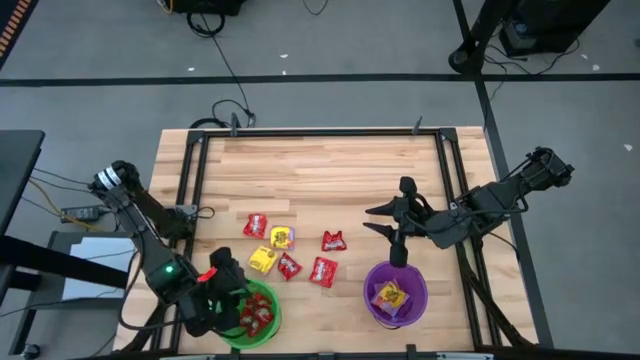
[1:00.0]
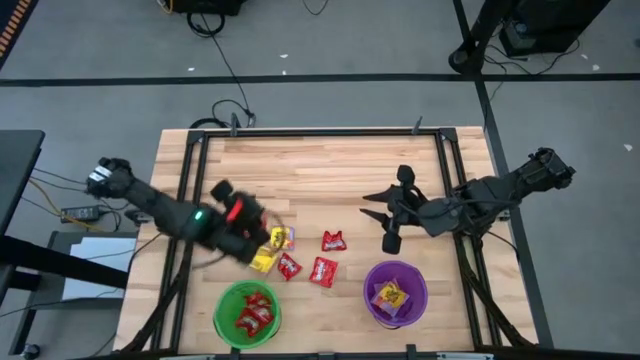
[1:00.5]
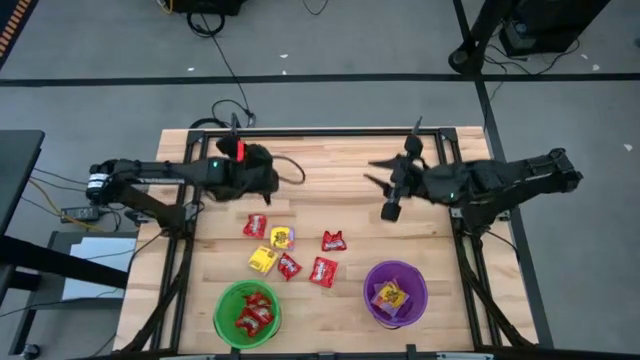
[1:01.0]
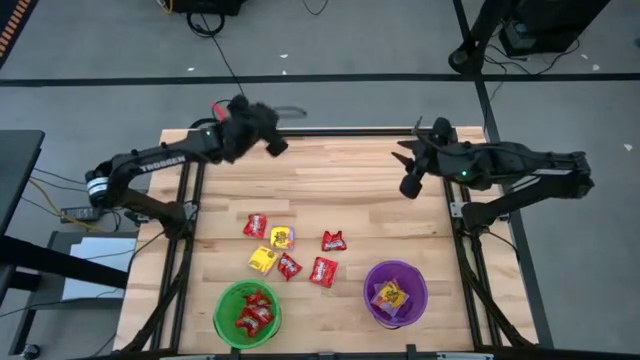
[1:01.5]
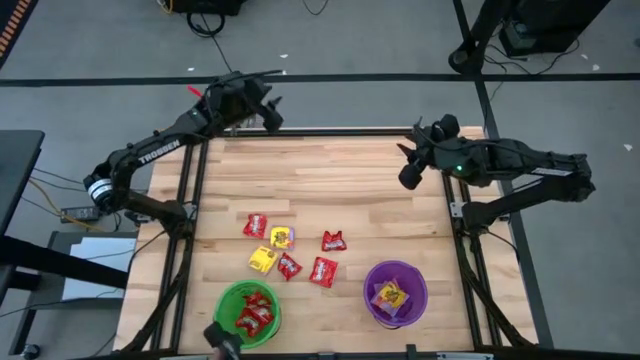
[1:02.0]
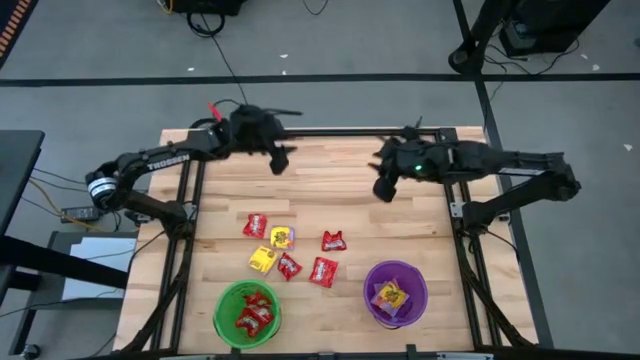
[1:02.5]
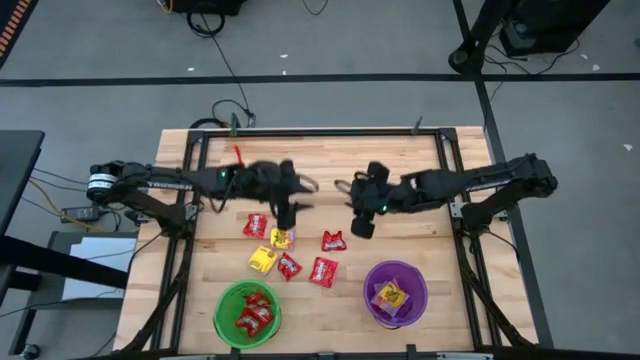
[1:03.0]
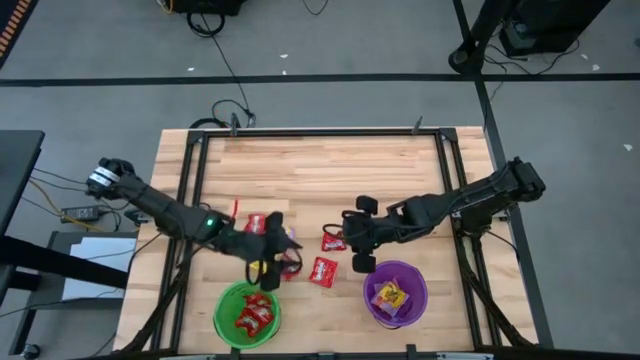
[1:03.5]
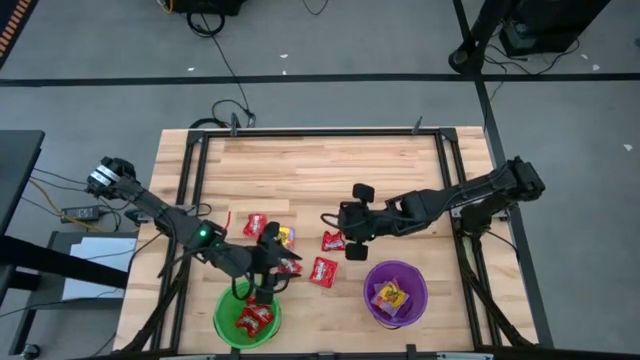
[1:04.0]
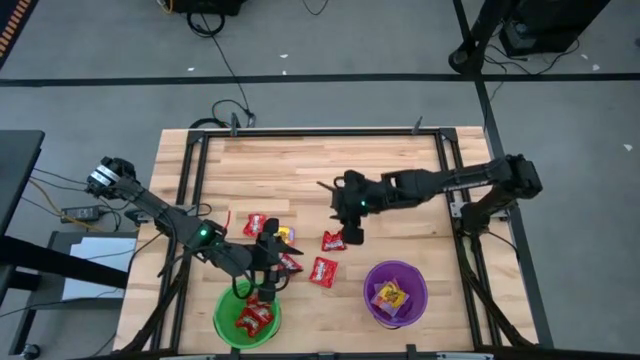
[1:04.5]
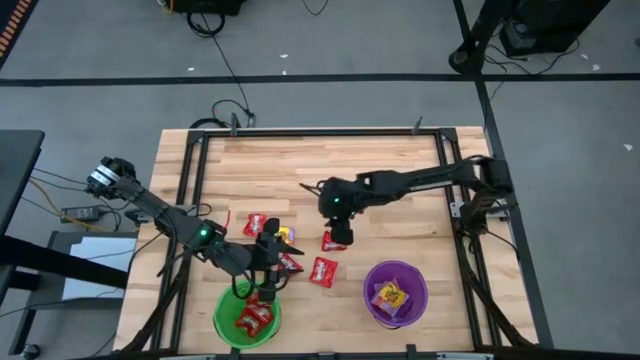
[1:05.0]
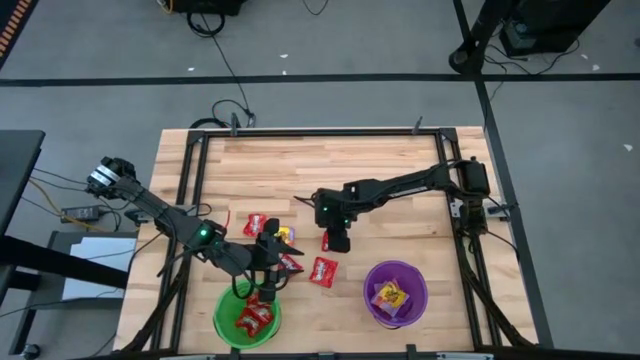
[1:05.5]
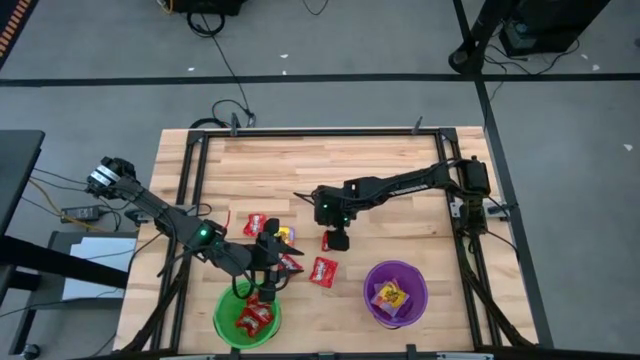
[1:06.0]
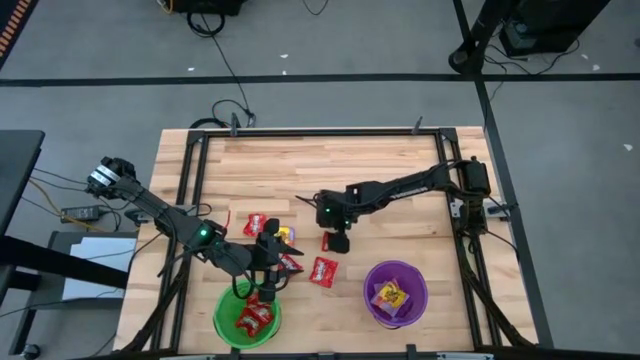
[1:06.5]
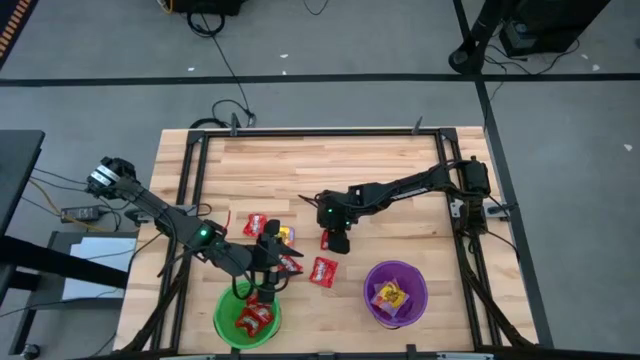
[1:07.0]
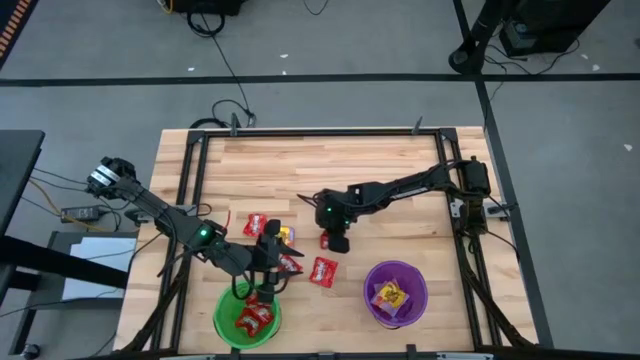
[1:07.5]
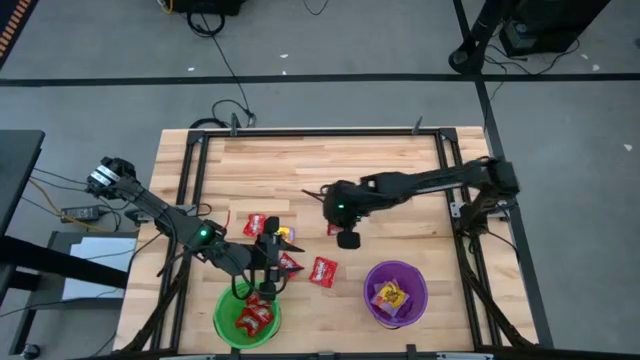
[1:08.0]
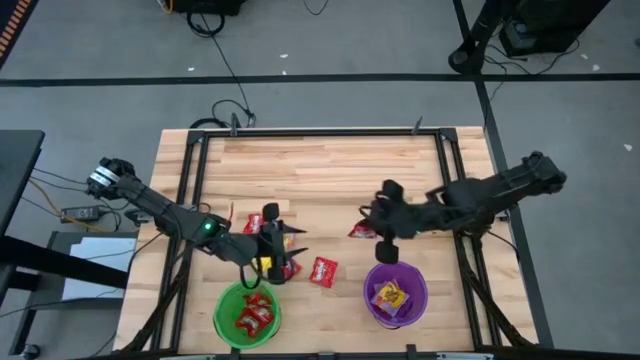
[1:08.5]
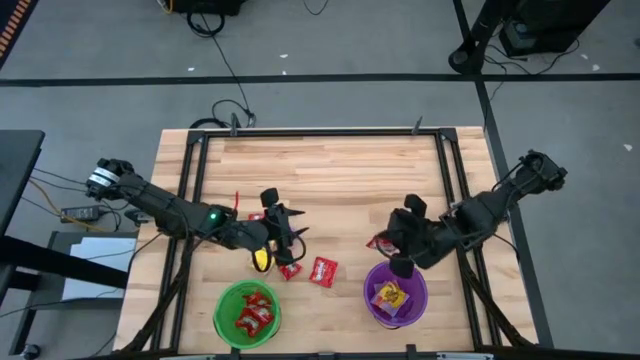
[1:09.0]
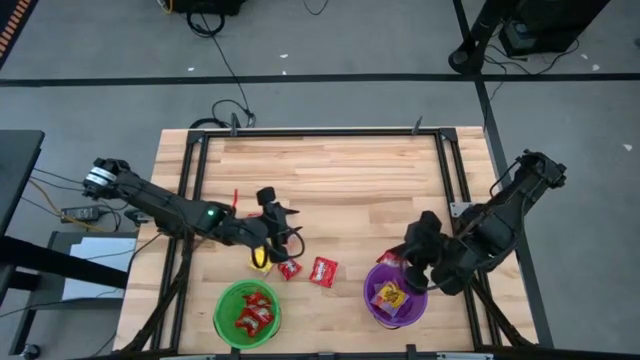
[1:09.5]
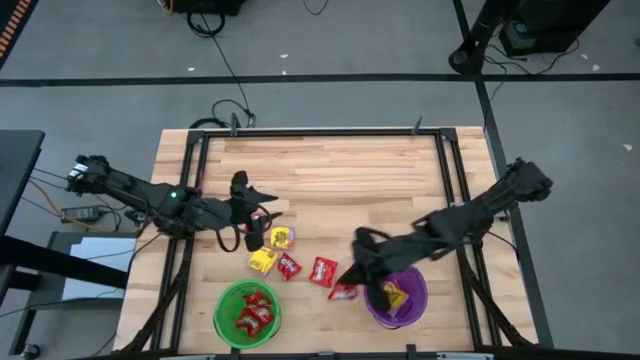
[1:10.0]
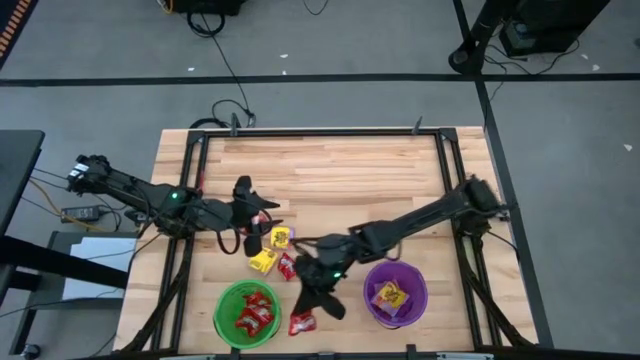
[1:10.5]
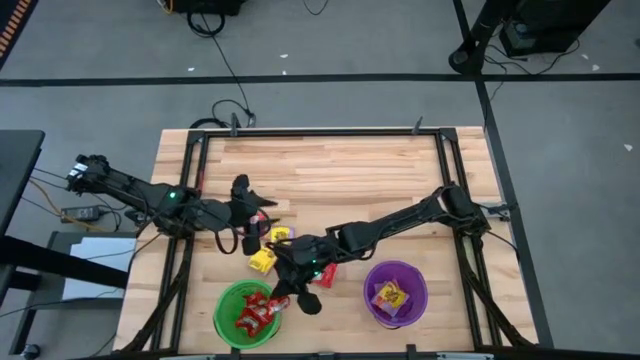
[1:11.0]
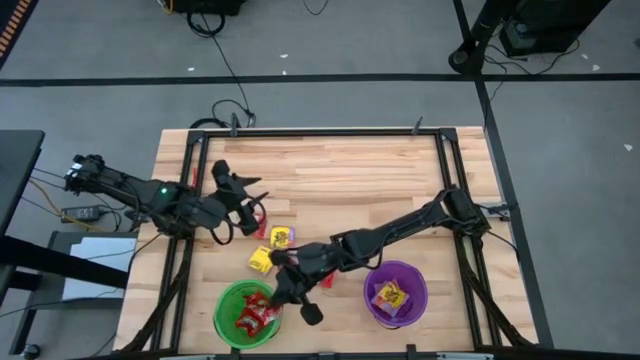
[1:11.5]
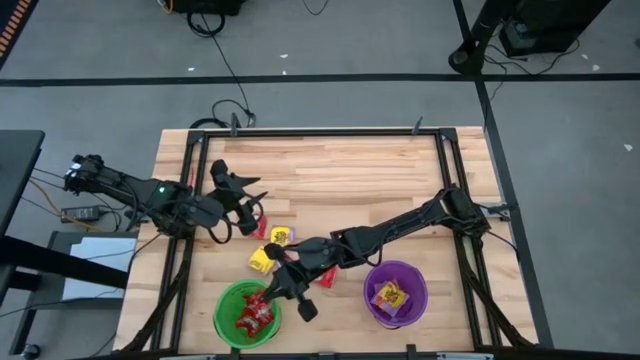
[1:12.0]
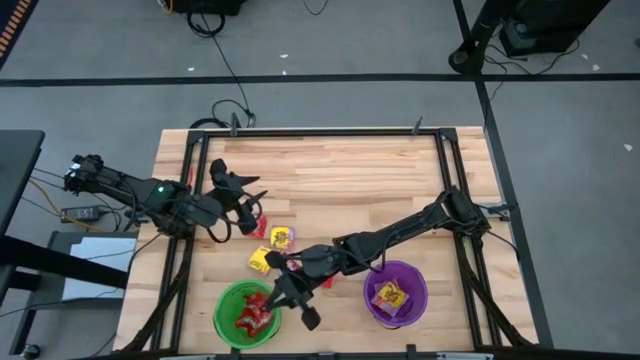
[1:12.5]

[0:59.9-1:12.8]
Task: Sort candy by brand, put in halloween buckets
Put the red candy into the green bucket

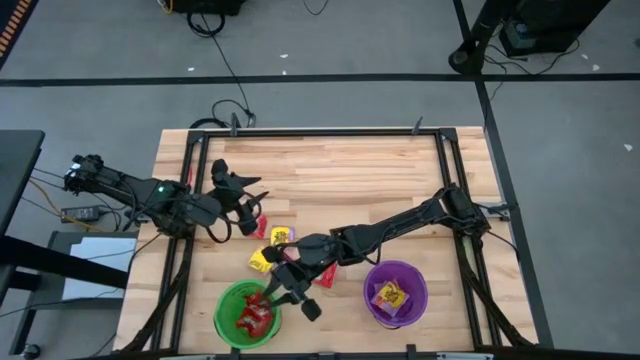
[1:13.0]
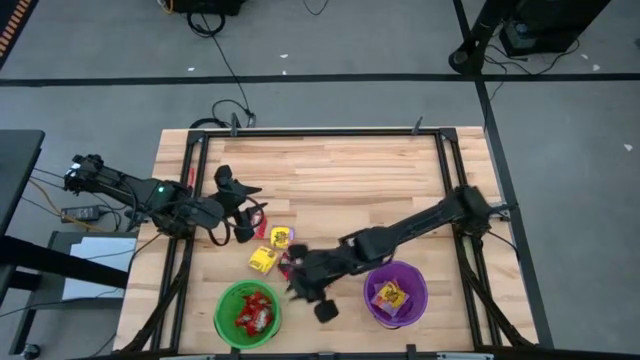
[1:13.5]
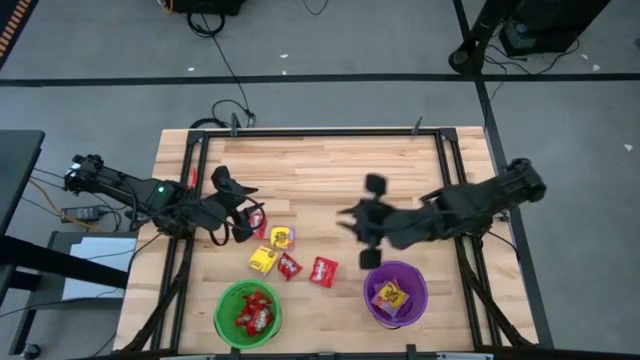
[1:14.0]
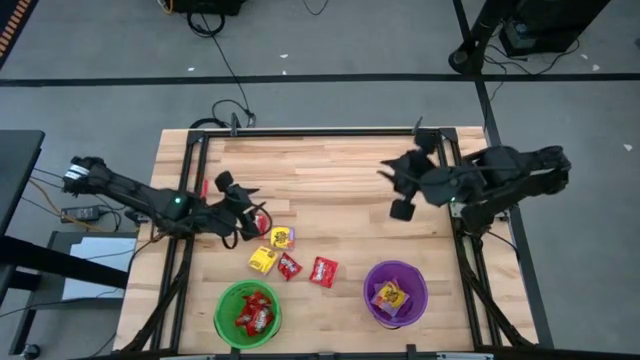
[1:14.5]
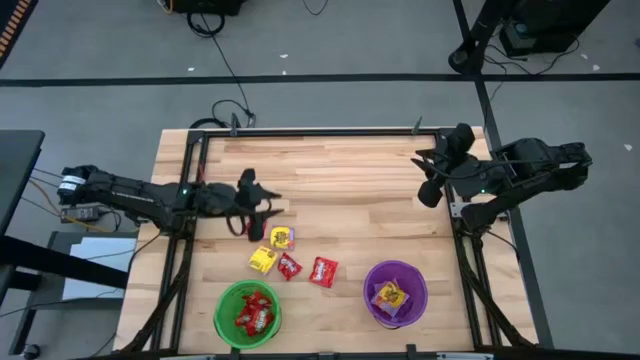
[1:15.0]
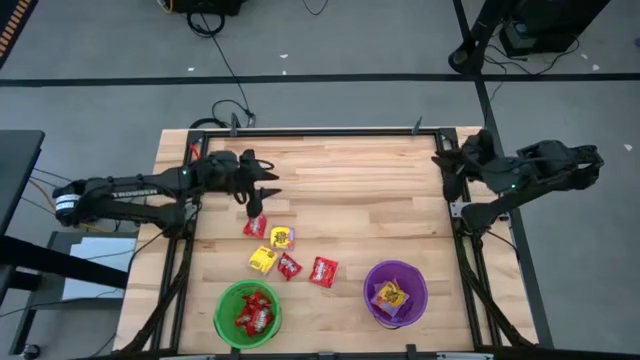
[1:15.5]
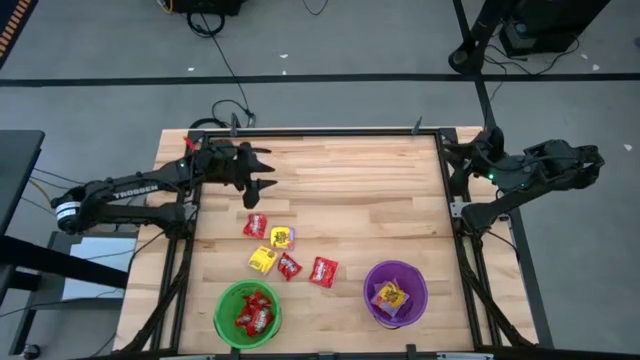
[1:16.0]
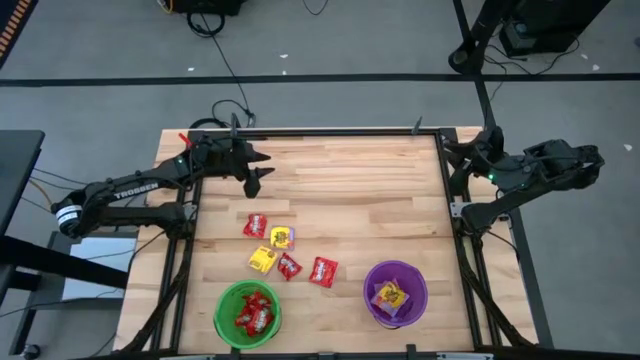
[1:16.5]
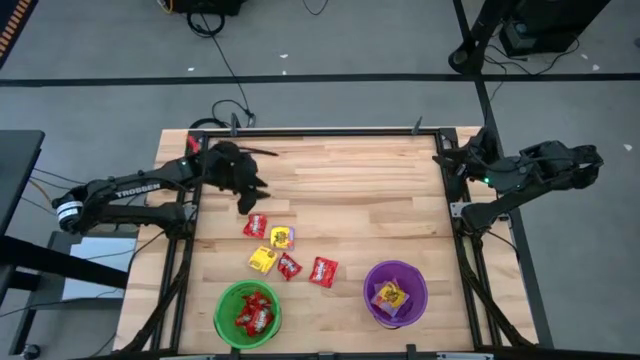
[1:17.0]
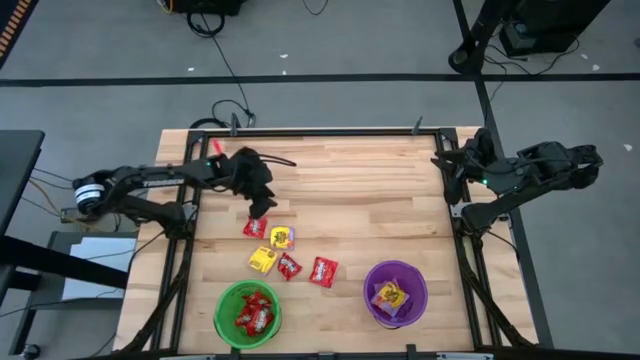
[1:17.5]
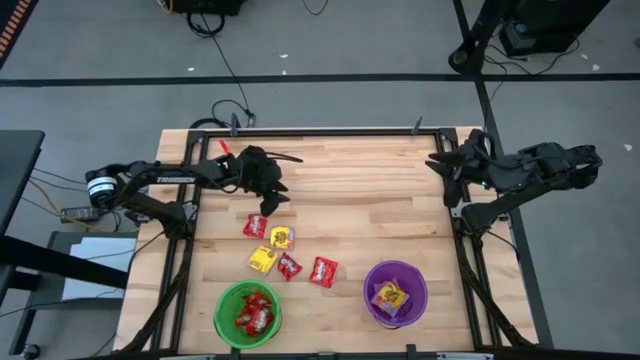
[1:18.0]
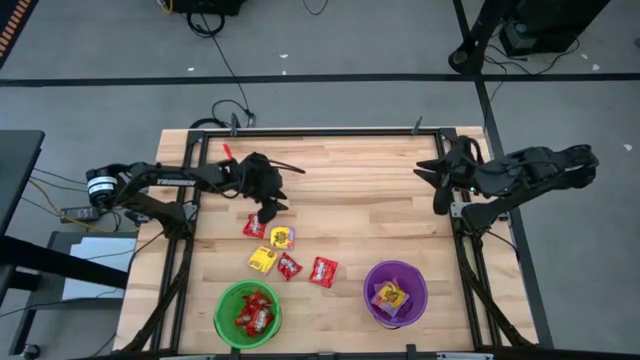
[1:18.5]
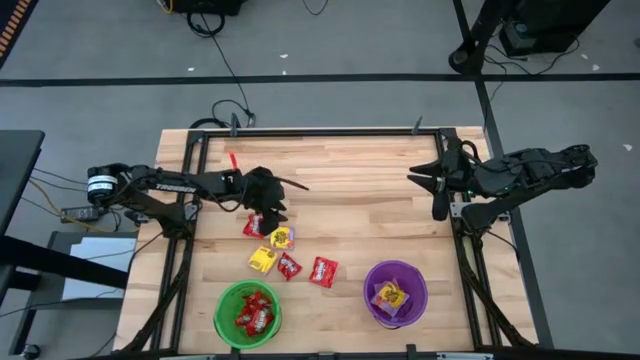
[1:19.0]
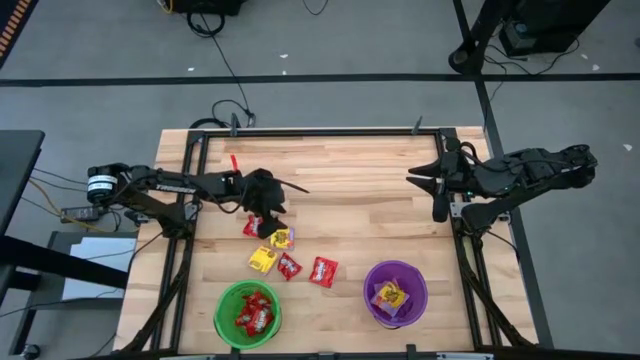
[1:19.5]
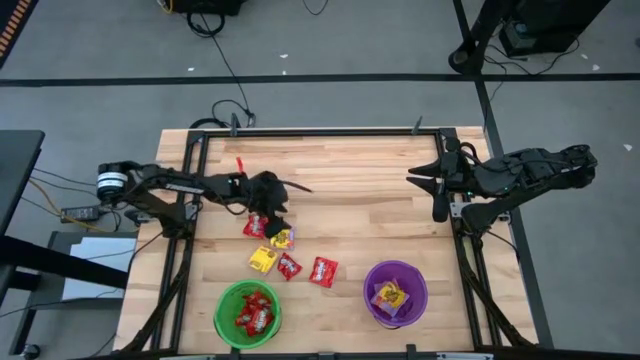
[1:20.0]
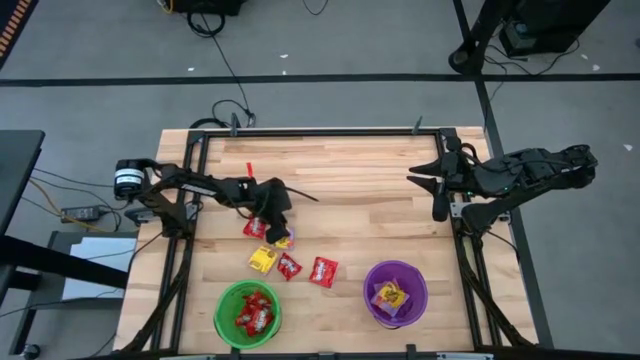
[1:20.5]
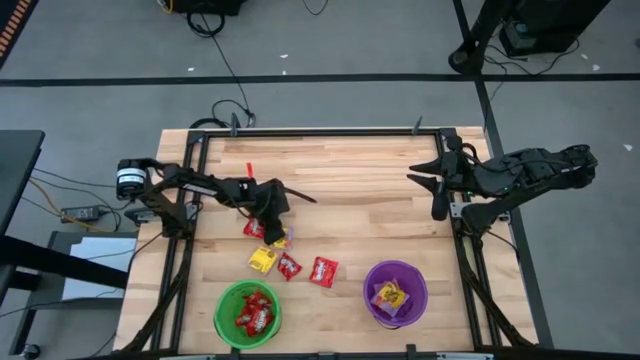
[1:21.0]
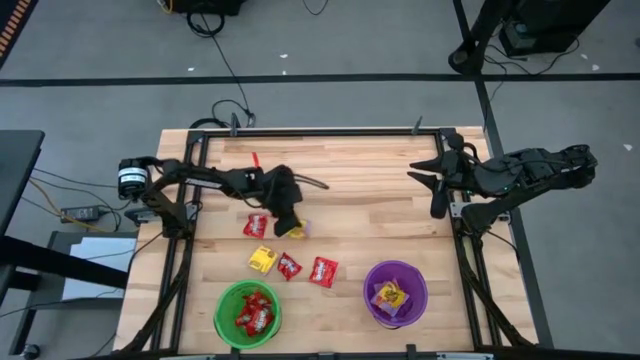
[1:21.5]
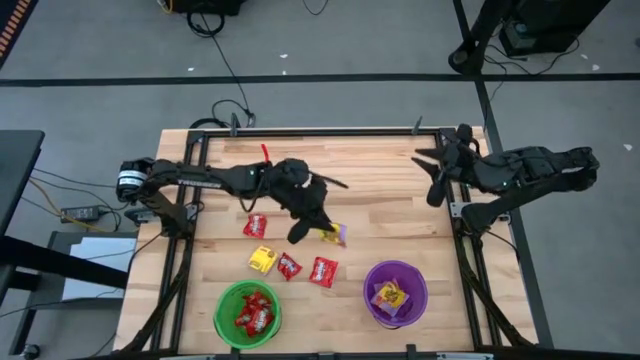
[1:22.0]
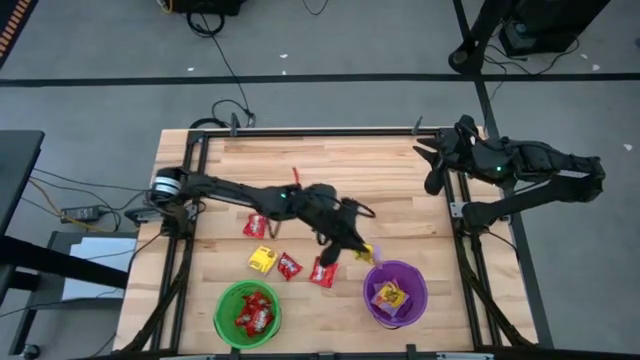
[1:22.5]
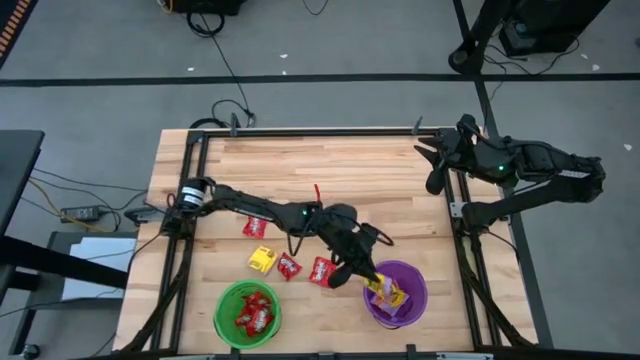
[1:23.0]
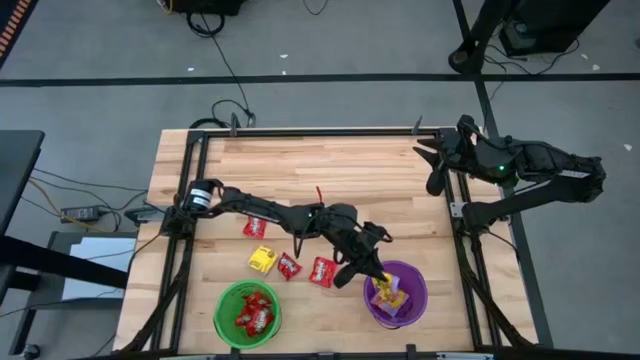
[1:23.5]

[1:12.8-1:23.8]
Put the yellow candy into the purple bucket
